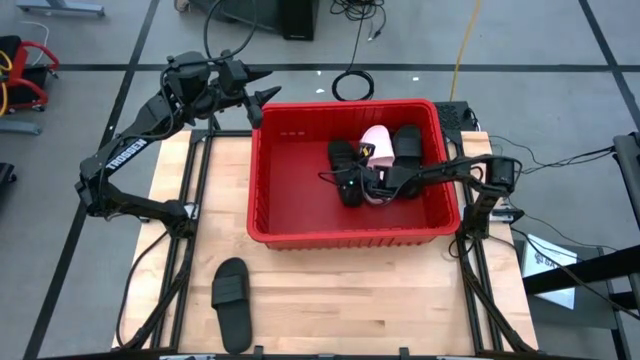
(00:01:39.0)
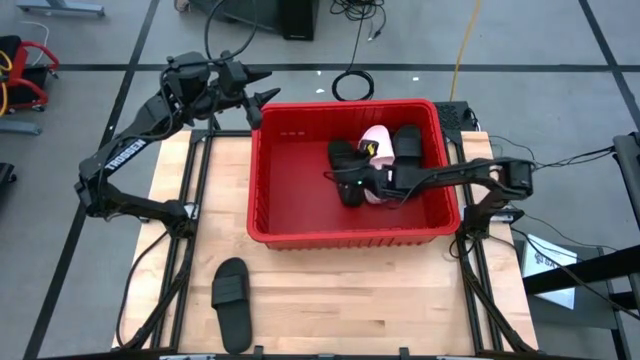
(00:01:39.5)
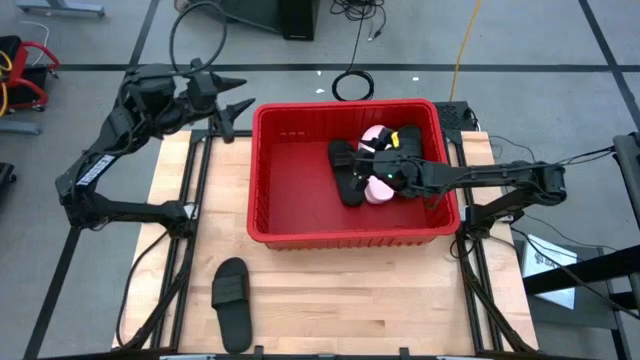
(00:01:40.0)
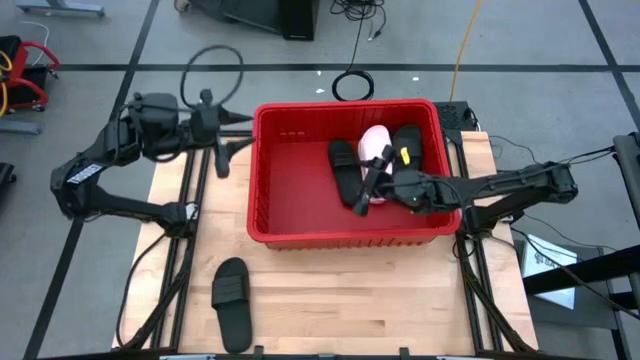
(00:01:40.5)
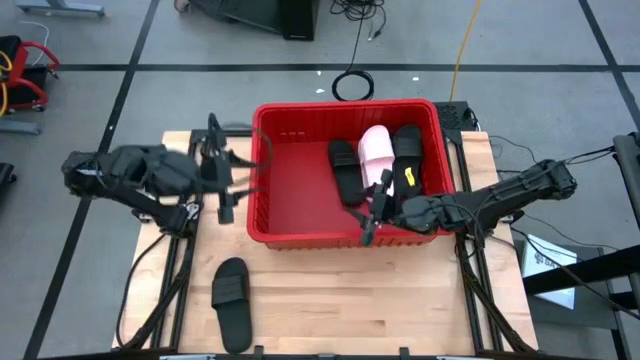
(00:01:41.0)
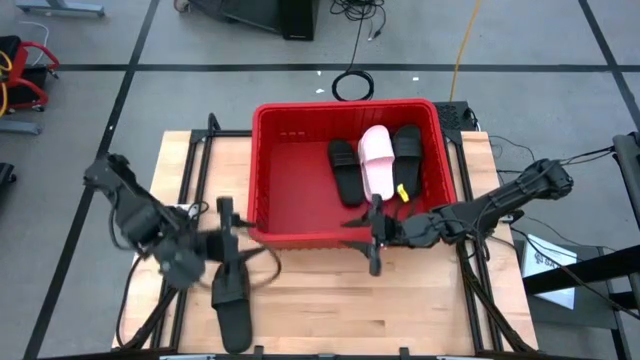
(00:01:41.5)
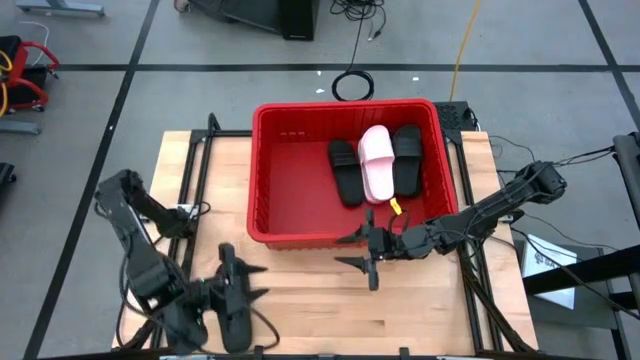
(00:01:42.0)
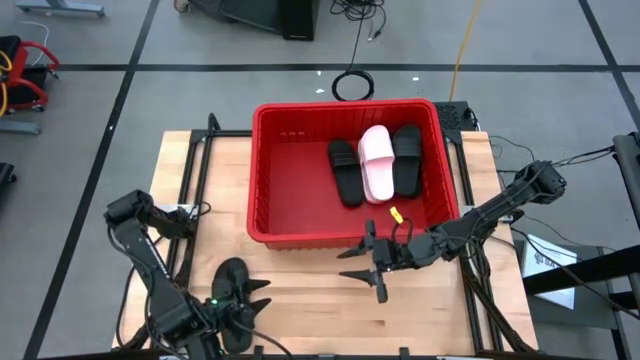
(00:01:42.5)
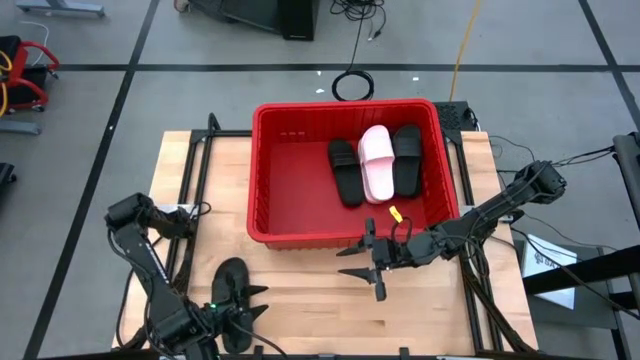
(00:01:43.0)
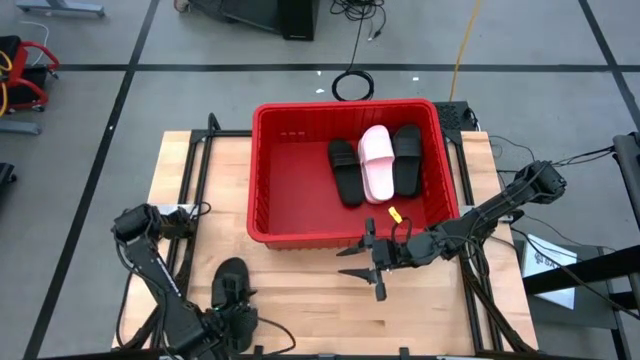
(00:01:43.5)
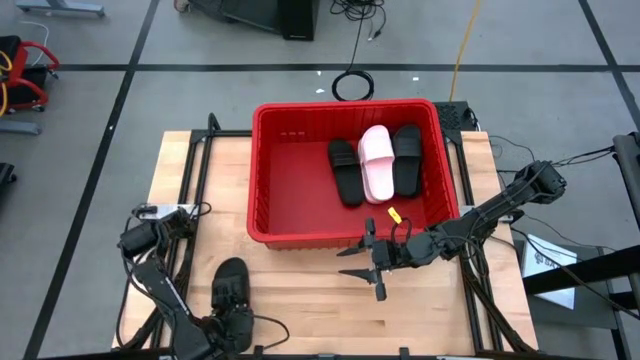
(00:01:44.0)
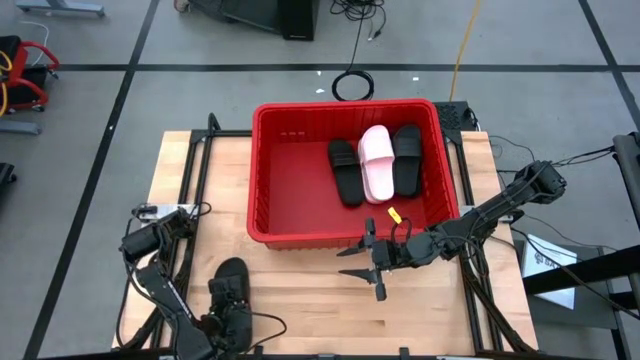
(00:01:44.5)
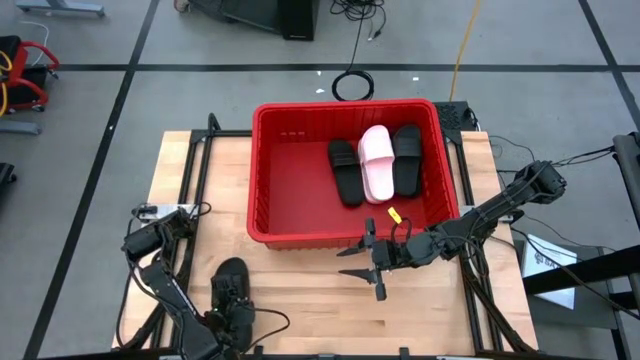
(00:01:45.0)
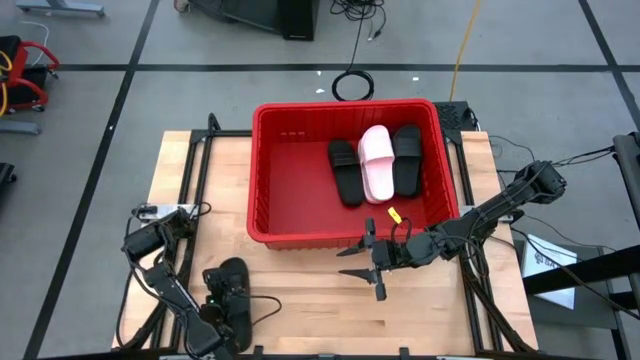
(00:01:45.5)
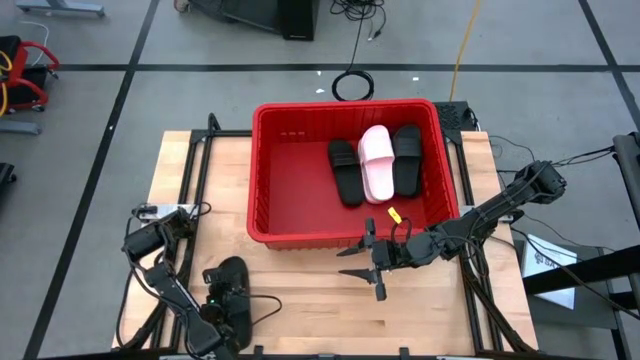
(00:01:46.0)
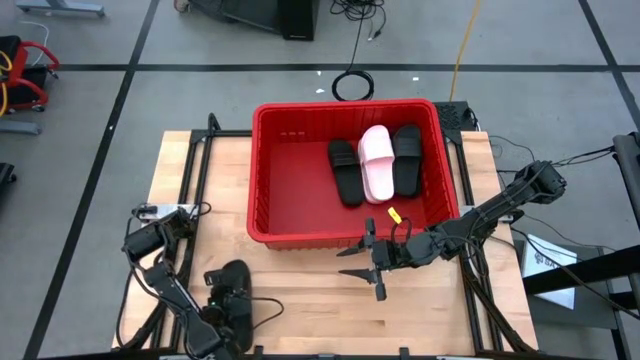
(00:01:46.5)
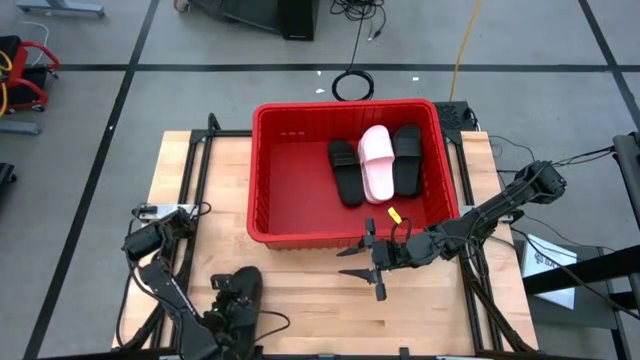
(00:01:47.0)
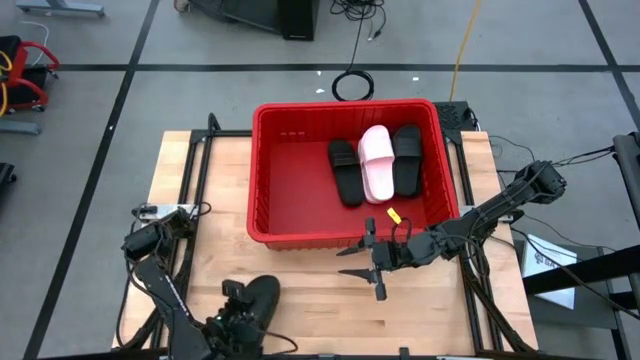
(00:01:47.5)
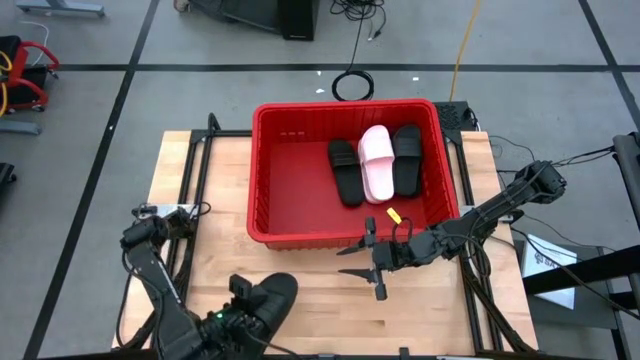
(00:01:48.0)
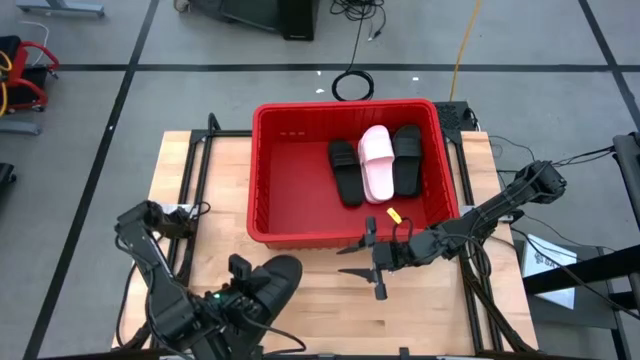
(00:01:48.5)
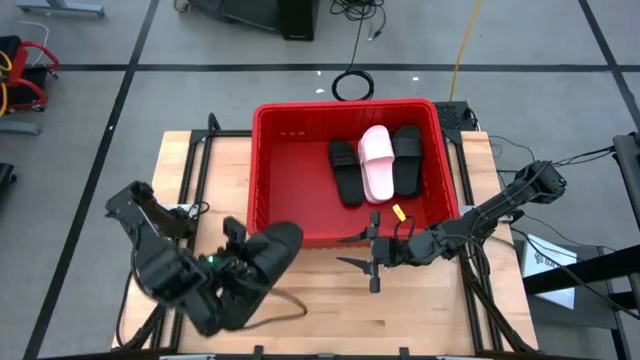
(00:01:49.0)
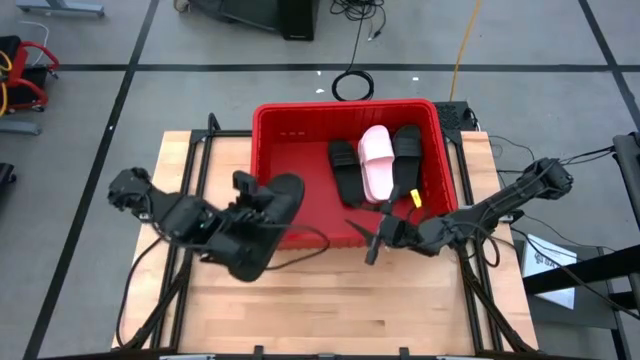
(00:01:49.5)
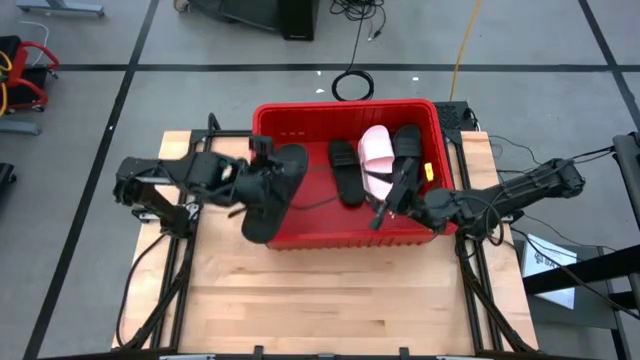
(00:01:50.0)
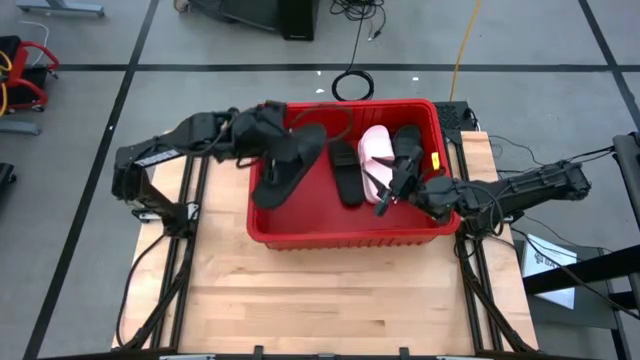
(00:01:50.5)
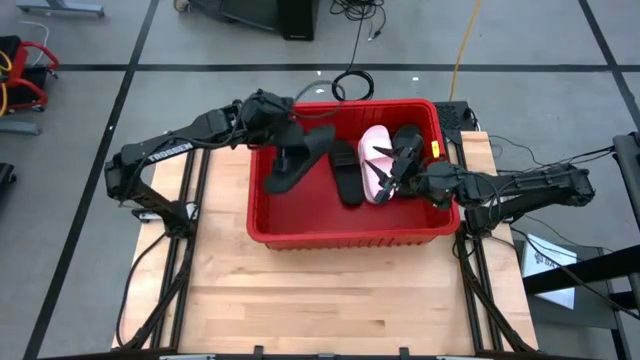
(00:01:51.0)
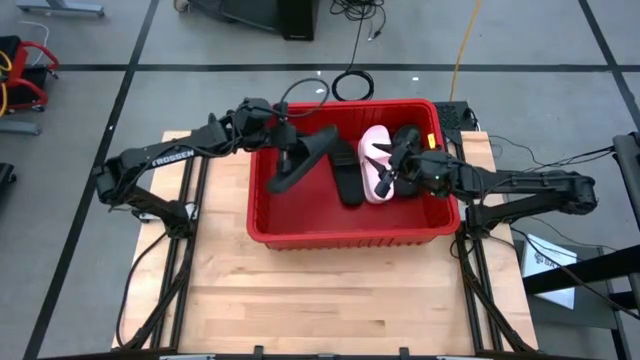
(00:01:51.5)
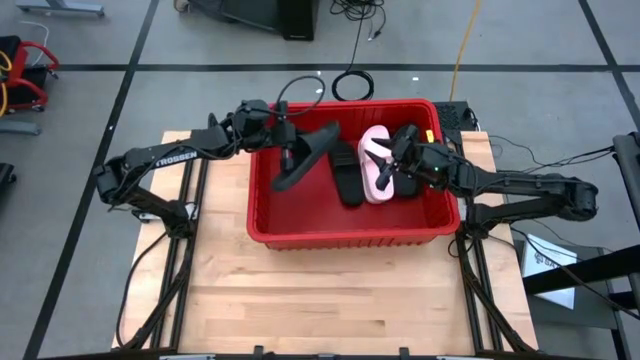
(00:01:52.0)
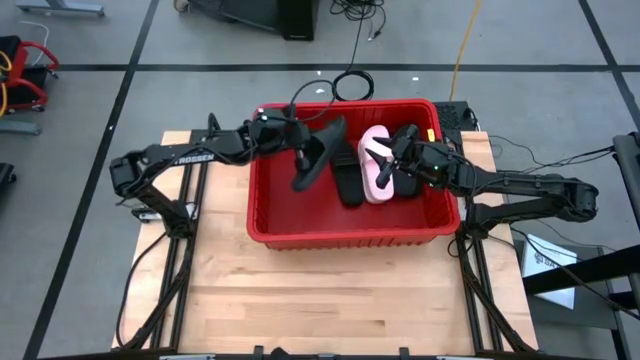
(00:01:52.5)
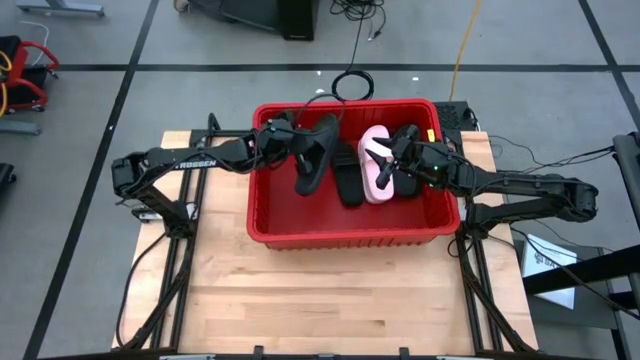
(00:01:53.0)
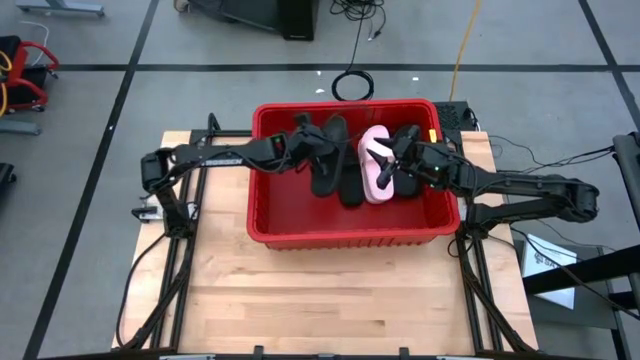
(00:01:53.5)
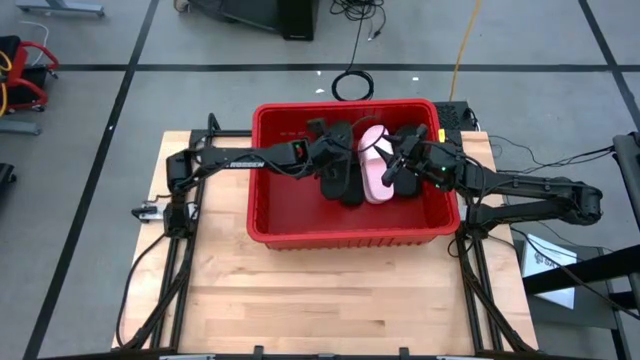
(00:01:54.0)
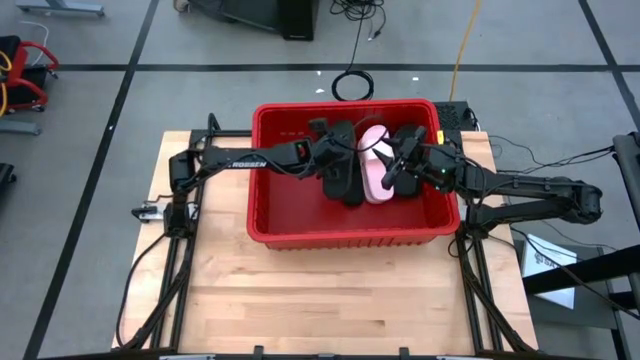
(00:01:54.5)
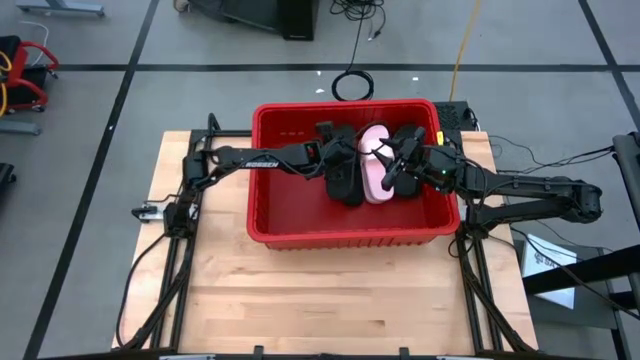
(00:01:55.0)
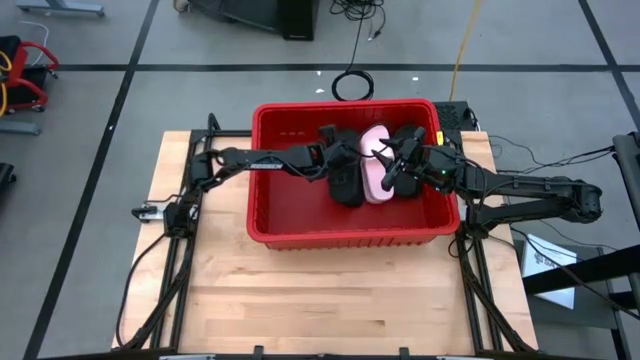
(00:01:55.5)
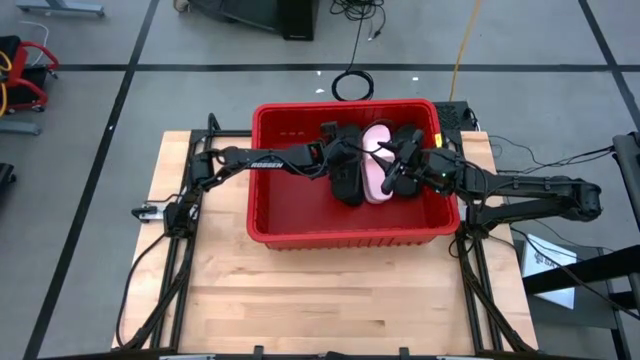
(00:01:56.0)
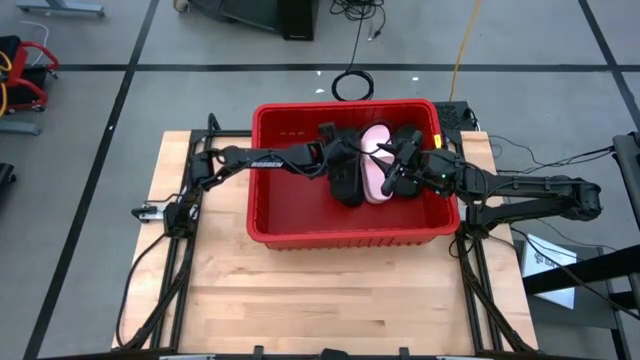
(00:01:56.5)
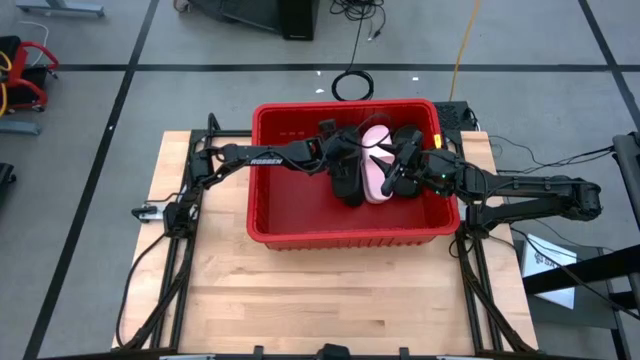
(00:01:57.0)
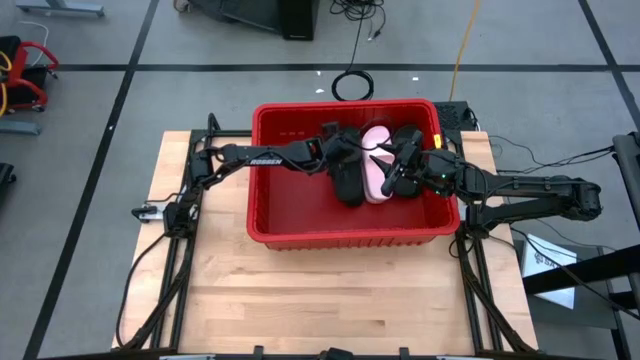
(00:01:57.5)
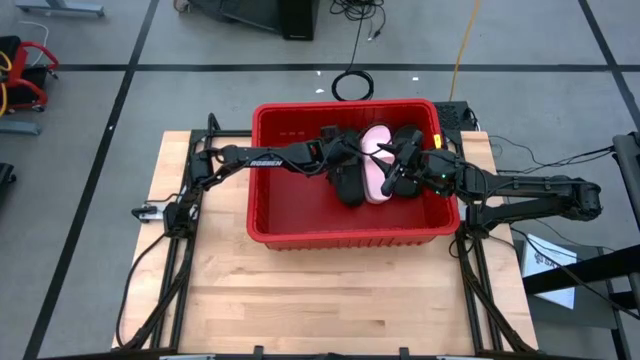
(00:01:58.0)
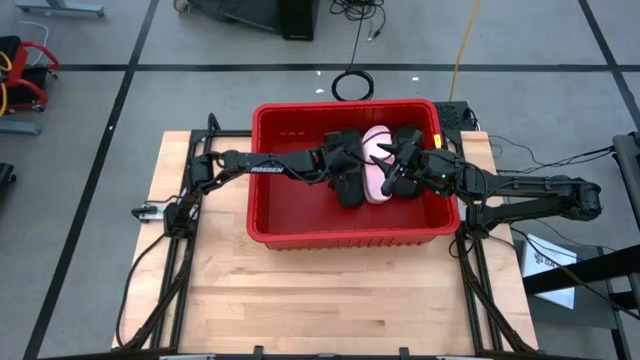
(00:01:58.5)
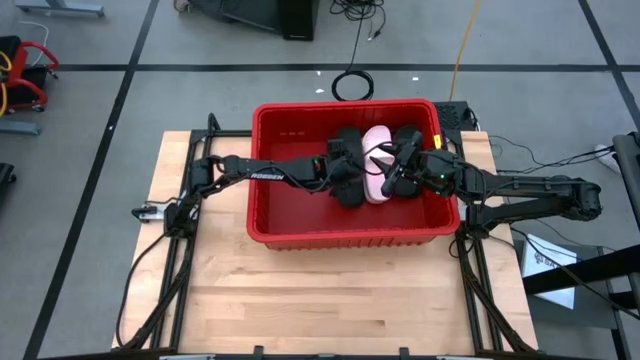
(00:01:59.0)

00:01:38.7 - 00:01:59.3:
Task: Pick and place slides into bin
Put the black slide into the bin
